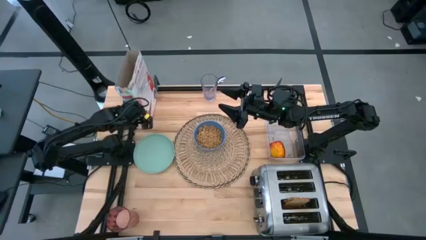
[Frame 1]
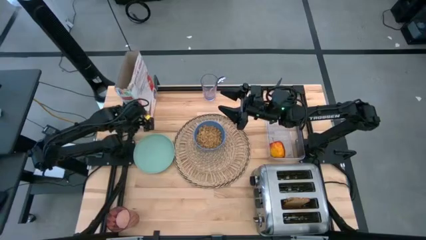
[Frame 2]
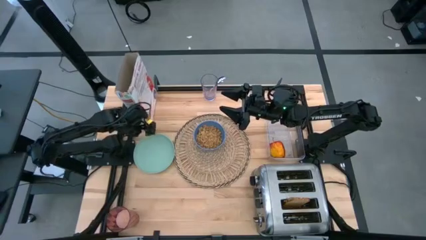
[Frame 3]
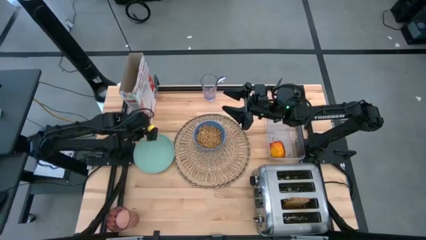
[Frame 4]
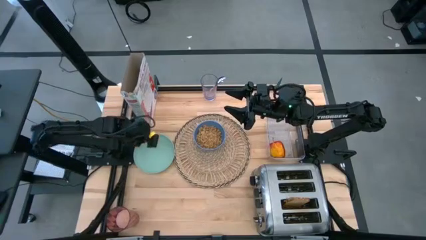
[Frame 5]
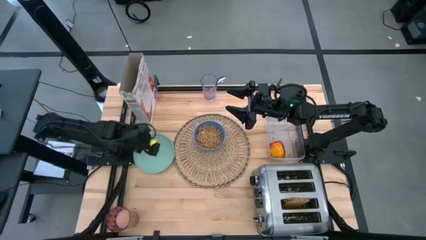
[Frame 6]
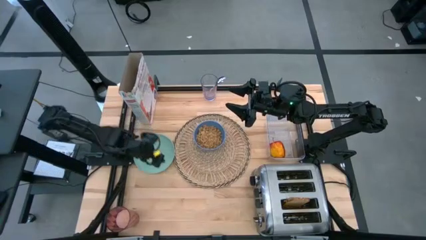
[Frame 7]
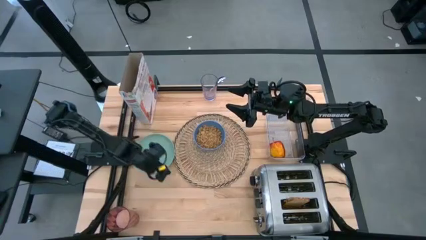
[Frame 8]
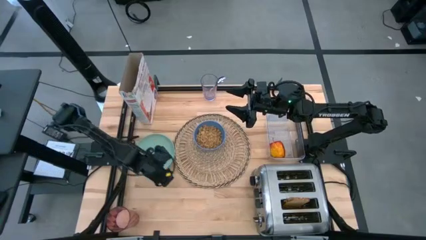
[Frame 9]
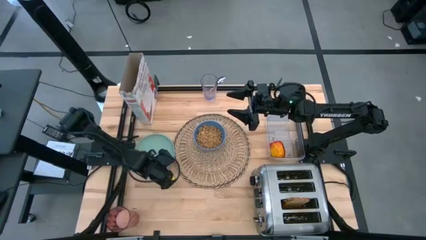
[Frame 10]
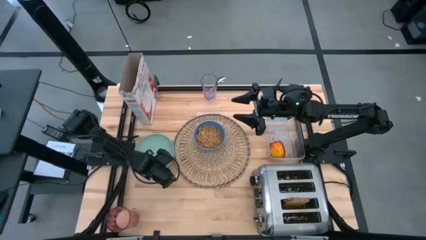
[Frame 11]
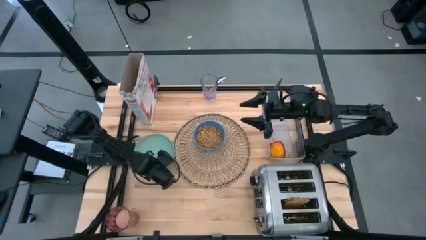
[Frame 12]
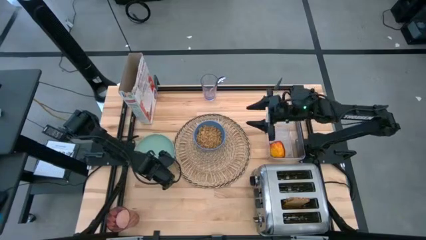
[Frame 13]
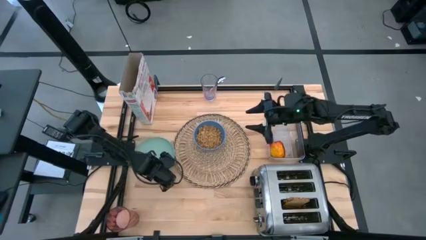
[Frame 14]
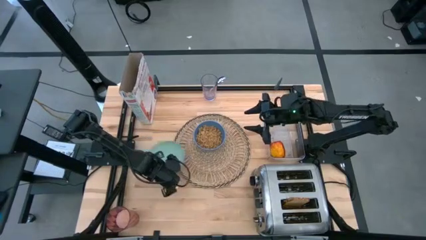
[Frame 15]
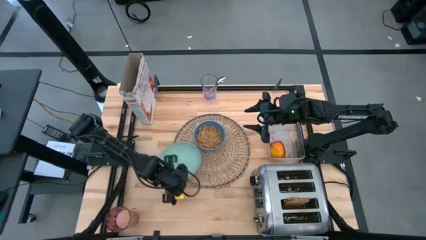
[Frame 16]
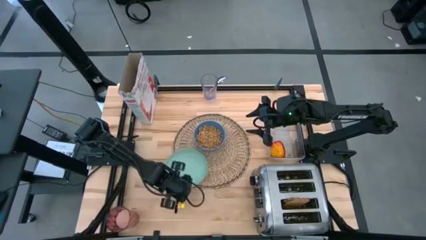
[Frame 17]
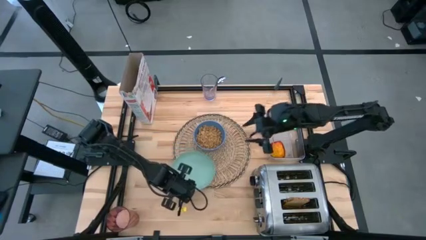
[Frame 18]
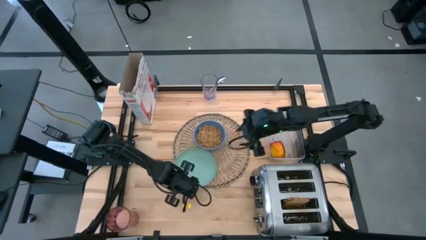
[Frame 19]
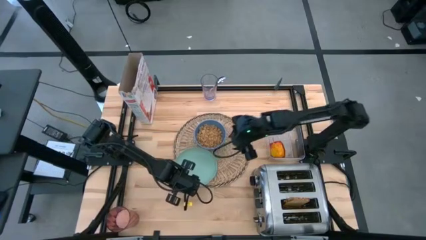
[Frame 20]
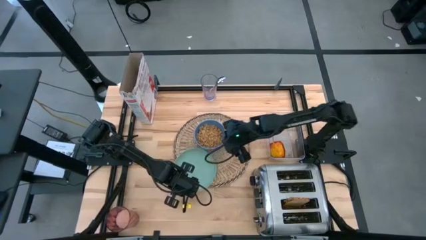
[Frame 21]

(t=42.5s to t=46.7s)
Task: Arrange a breakfast setting
Put the green plate on the table mat

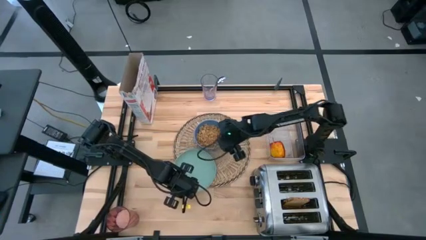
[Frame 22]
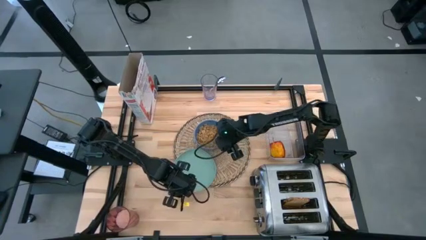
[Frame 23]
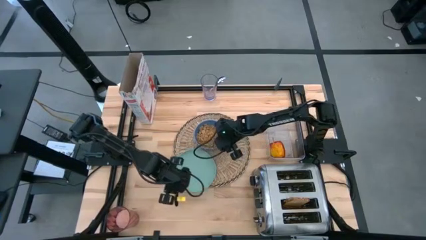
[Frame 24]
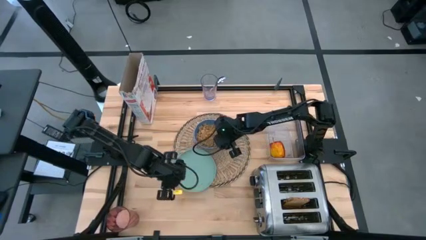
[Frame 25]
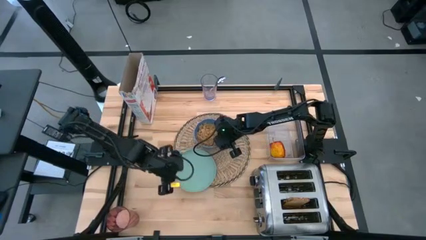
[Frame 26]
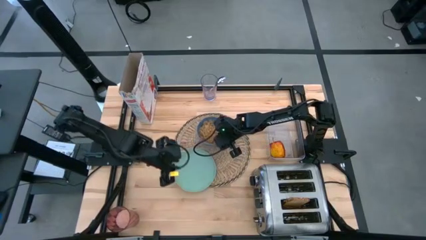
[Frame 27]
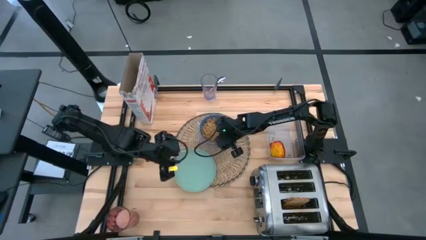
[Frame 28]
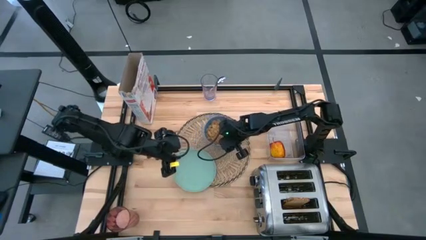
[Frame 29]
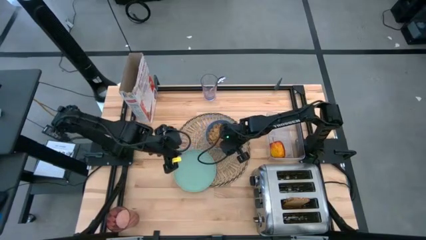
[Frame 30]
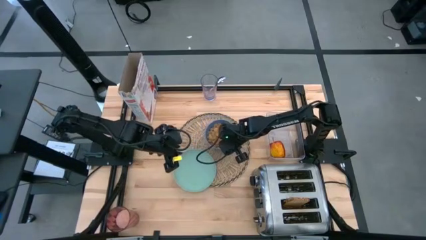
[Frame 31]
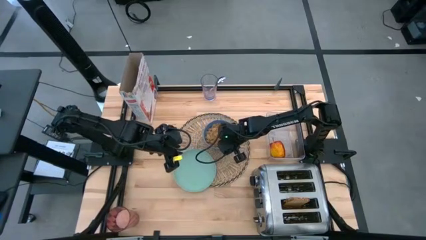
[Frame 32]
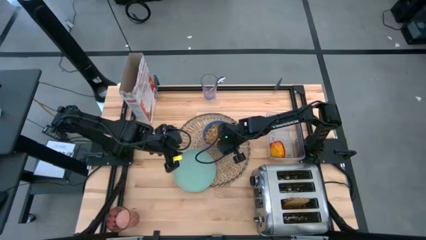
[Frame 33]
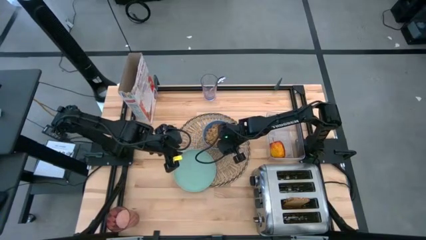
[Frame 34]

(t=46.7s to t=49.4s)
Adjust the bowl on the table mat

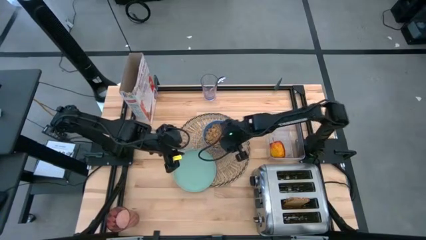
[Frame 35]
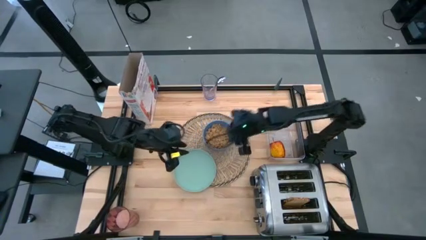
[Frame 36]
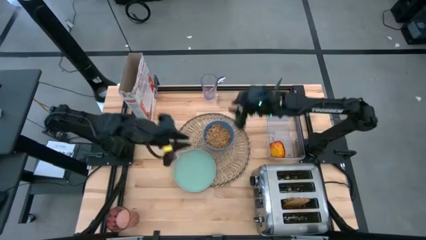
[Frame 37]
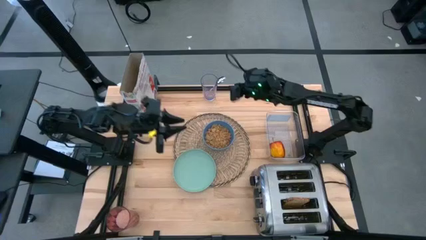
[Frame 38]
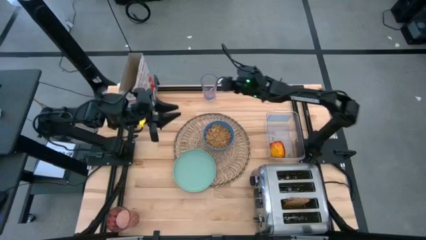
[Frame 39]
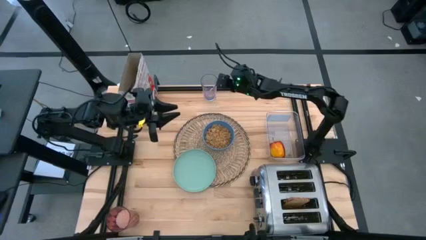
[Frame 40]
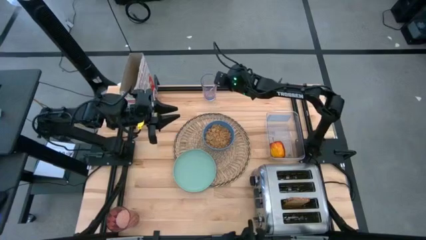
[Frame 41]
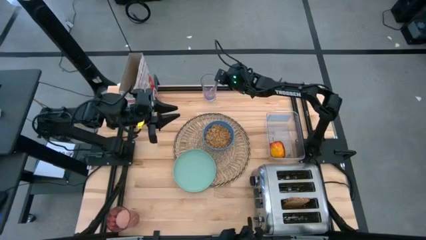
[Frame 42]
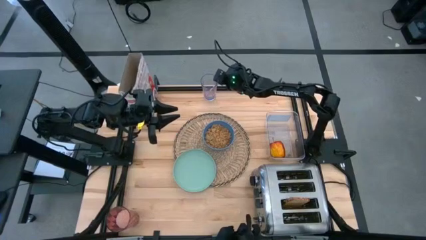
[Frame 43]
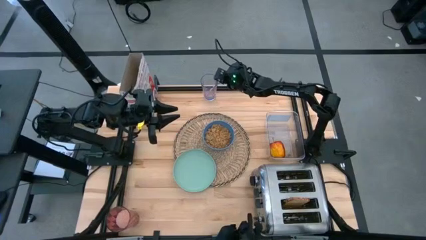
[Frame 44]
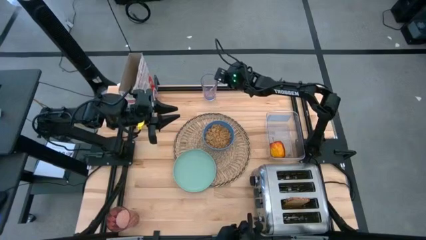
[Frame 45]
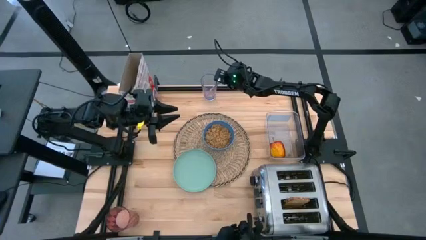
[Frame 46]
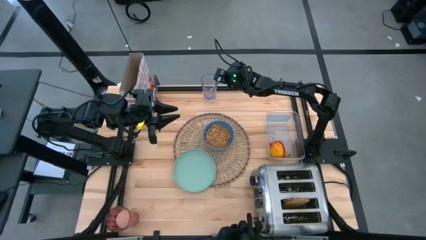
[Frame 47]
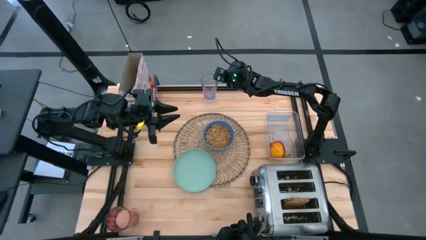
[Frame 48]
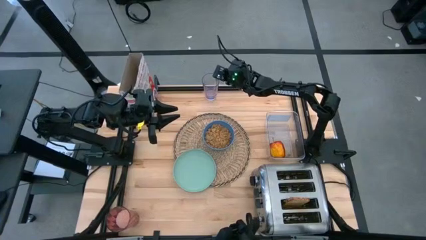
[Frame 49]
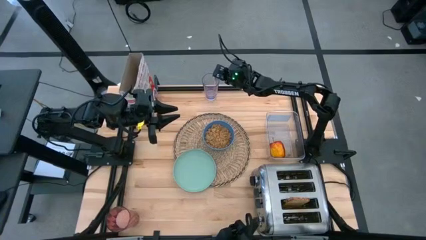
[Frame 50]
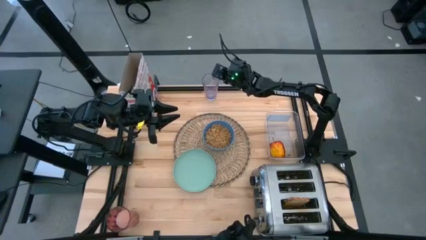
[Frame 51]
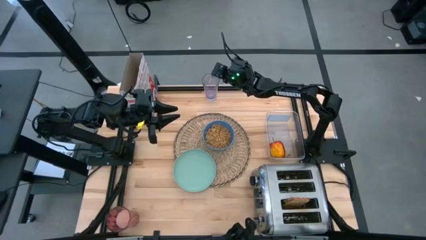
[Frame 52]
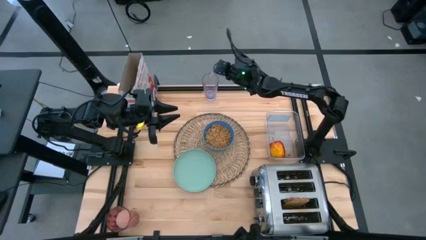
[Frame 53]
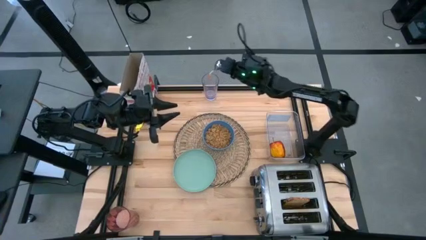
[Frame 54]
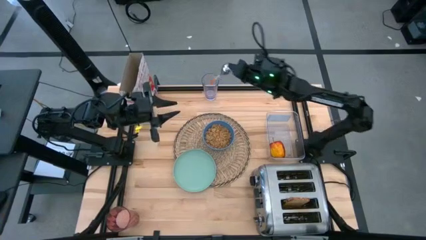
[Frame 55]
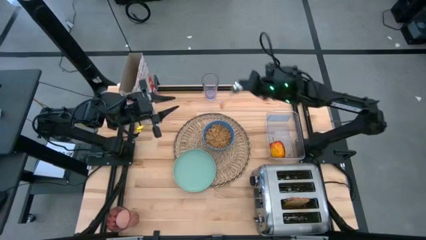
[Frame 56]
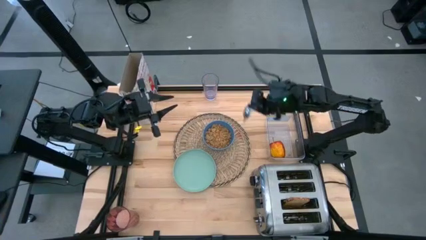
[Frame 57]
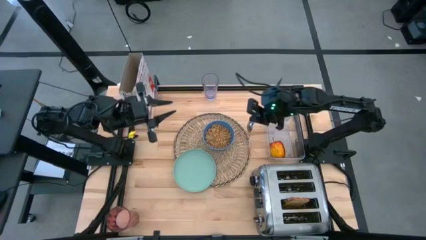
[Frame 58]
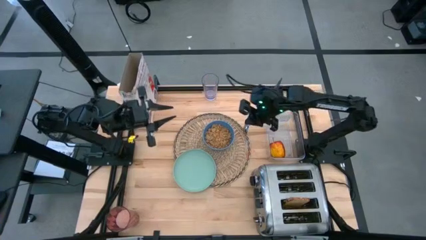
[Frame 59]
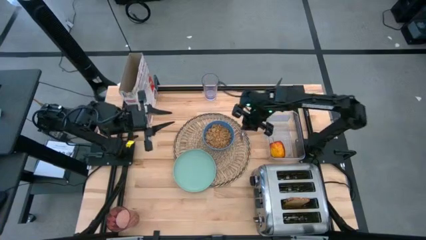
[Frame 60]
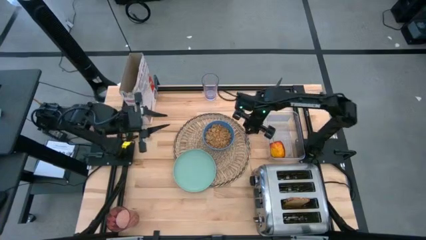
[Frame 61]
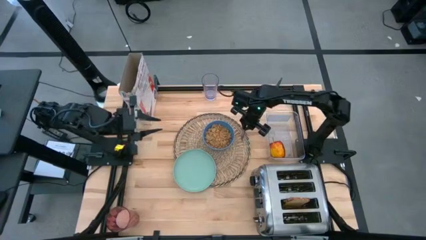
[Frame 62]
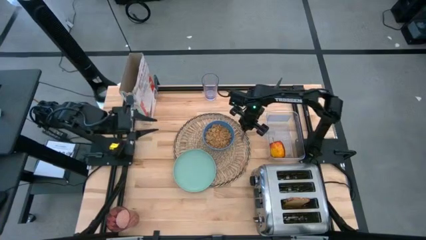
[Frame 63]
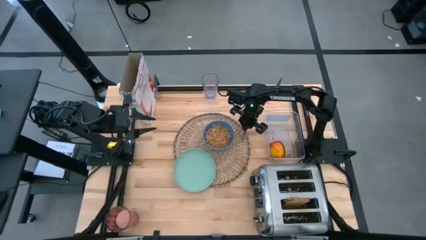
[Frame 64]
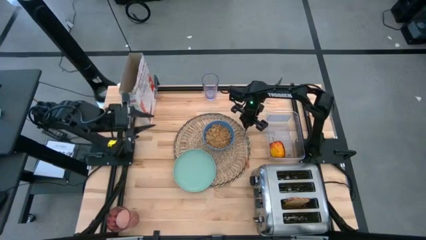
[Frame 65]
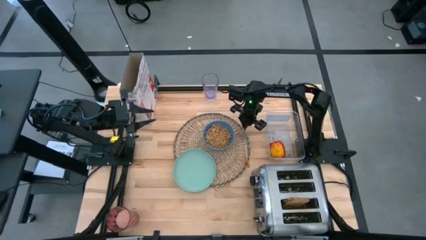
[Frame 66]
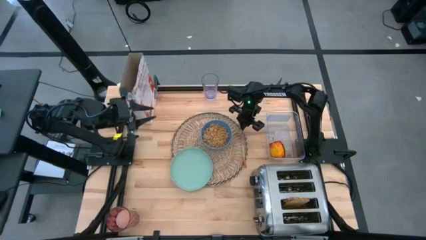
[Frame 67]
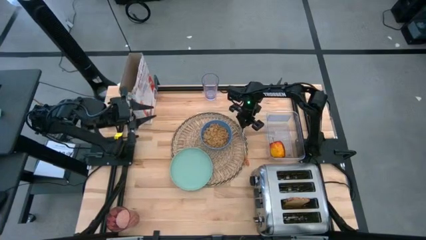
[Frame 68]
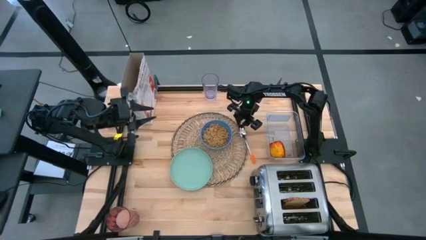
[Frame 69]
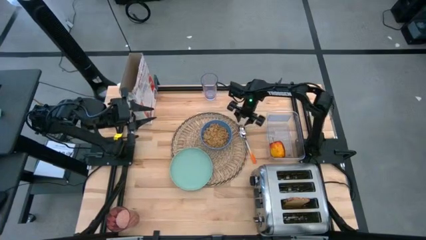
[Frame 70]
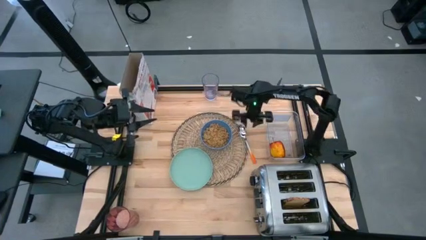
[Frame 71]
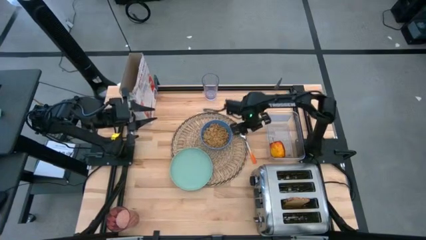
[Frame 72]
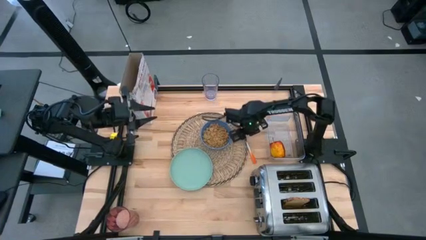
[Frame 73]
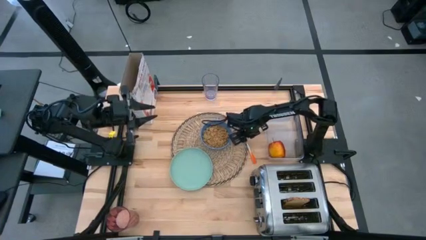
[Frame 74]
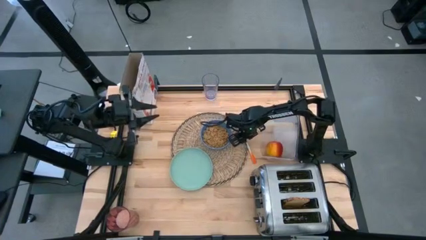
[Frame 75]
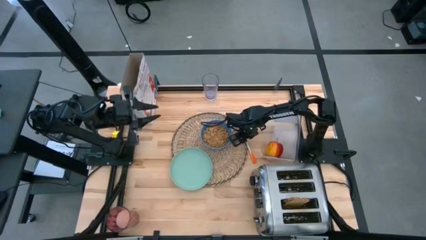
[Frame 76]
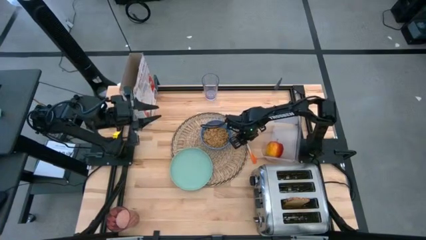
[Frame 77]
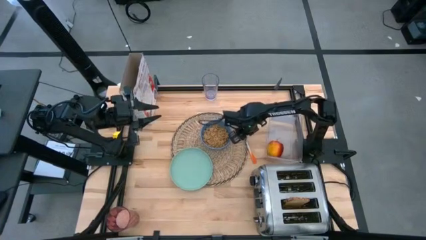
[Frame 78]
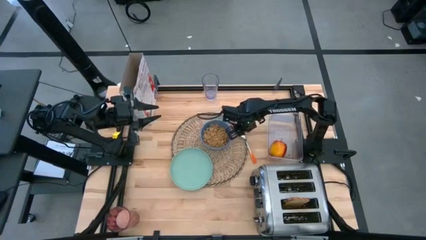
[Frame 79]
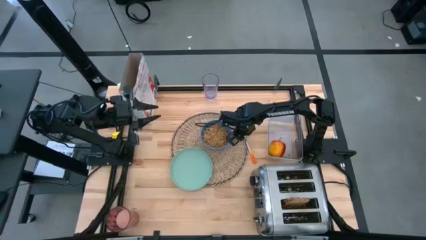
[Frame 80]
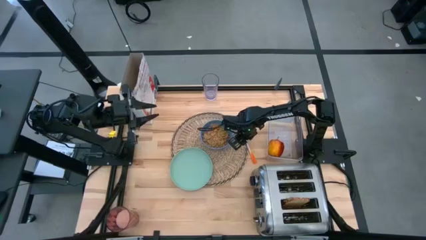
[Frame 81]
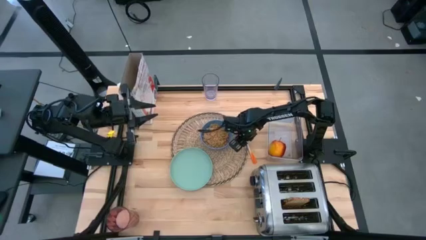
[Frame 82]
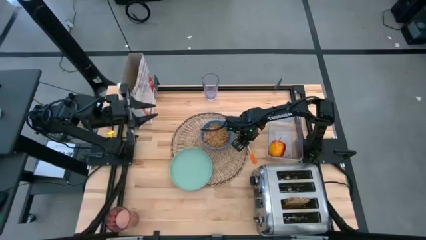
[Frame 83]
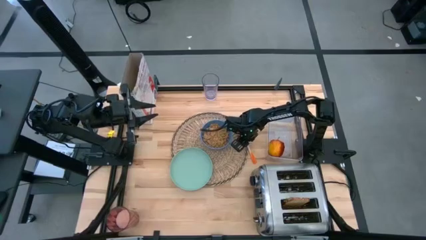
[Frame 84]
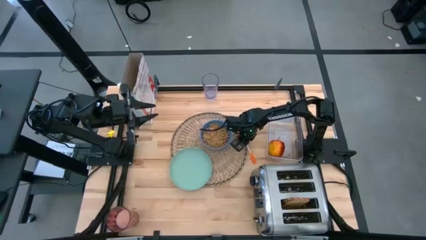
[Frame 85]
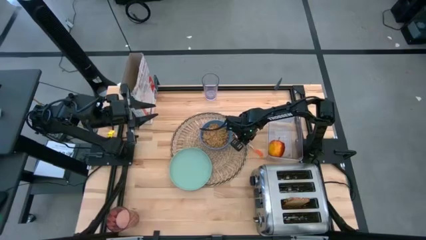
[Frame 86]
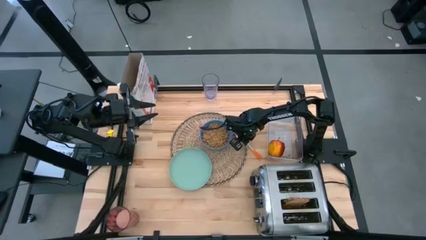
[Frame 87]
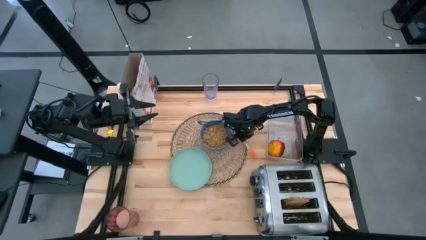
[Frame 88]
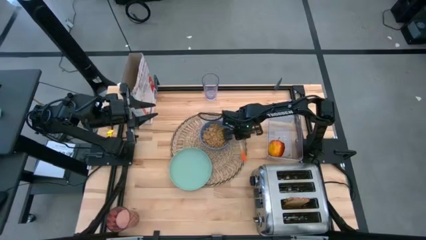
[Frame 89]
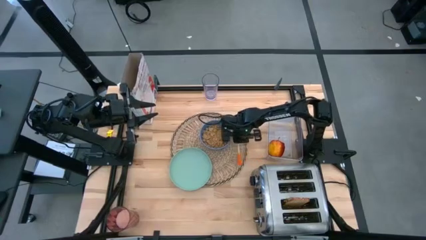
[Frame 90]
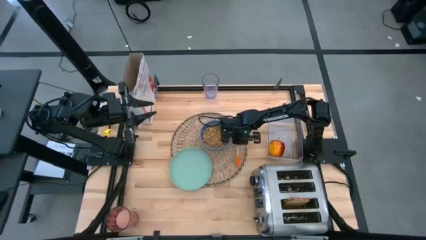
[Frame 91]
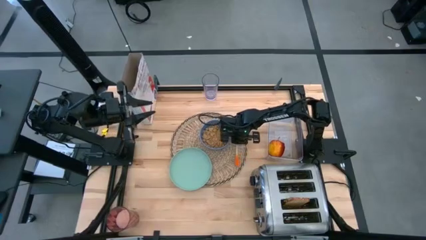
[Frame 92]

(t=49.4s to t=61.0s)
Put the spoon on the table mat
